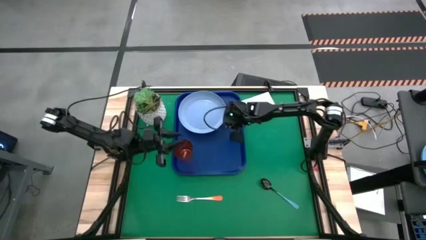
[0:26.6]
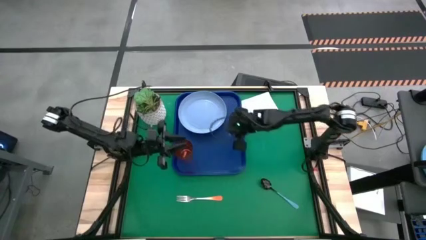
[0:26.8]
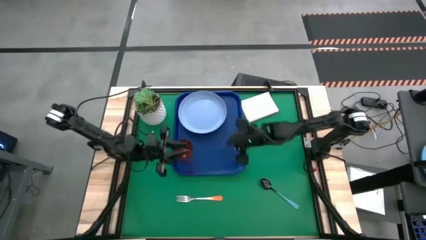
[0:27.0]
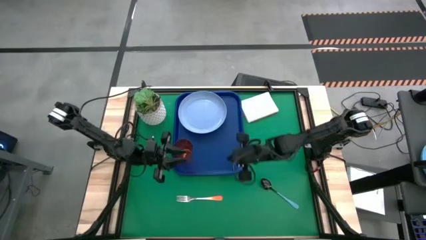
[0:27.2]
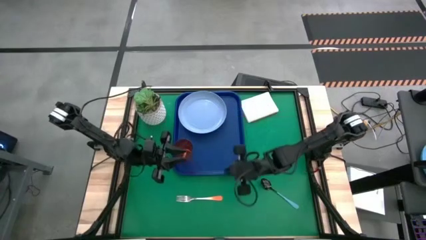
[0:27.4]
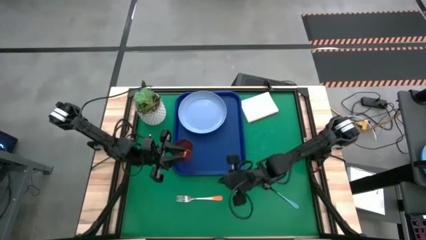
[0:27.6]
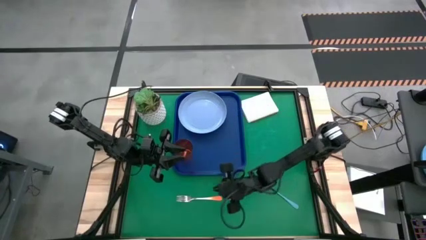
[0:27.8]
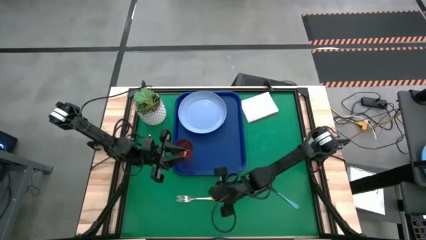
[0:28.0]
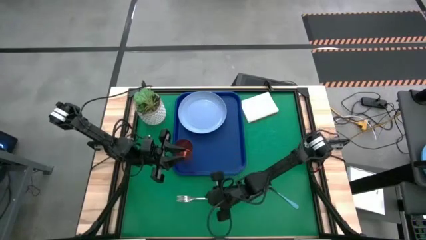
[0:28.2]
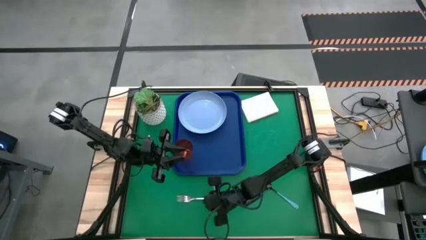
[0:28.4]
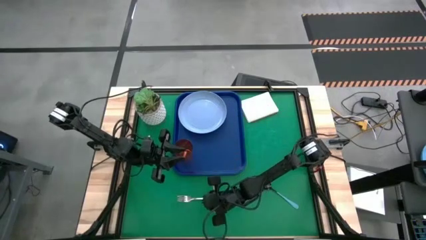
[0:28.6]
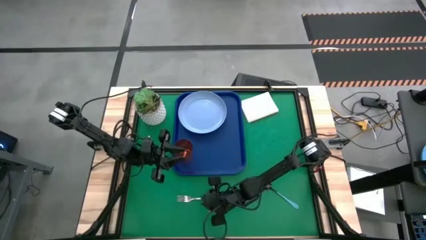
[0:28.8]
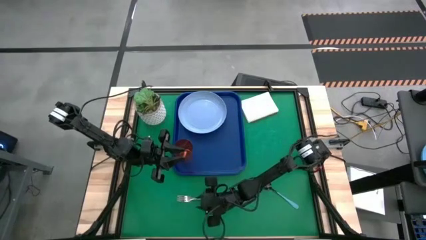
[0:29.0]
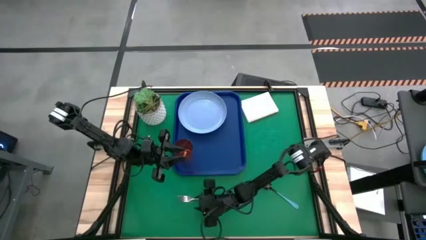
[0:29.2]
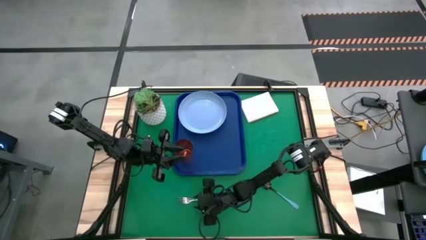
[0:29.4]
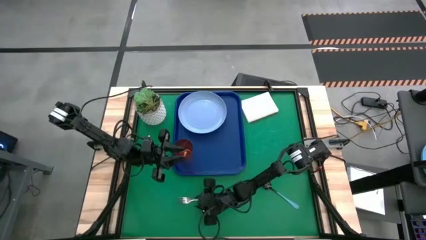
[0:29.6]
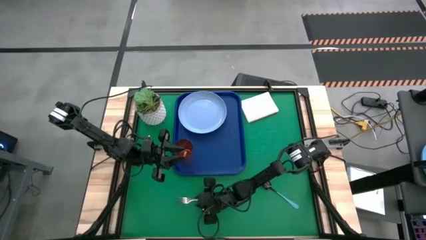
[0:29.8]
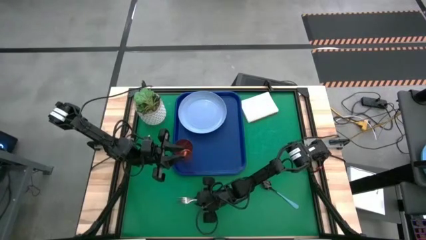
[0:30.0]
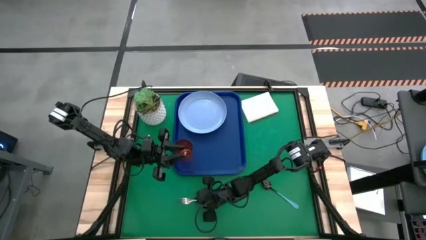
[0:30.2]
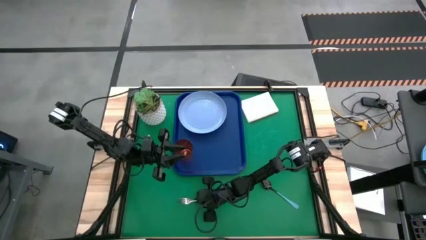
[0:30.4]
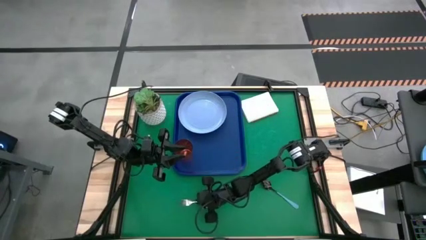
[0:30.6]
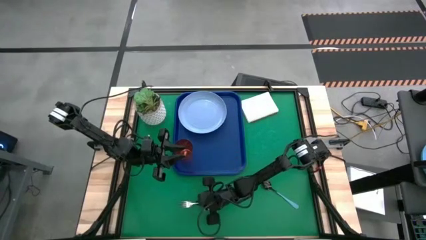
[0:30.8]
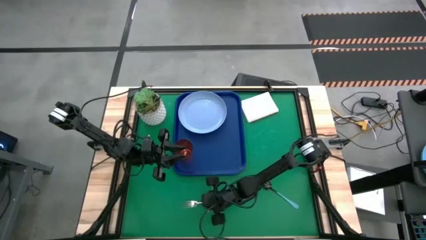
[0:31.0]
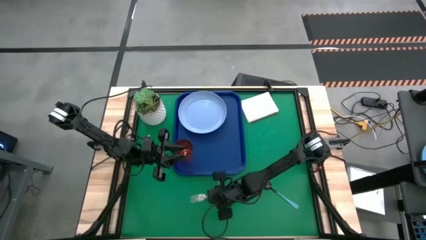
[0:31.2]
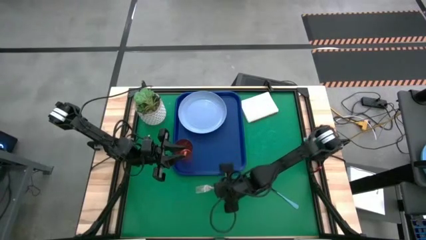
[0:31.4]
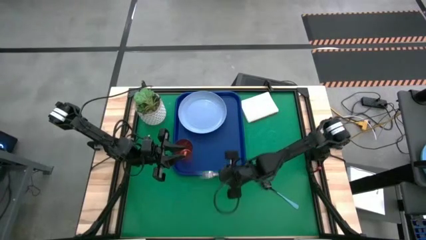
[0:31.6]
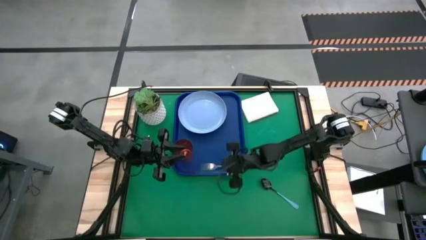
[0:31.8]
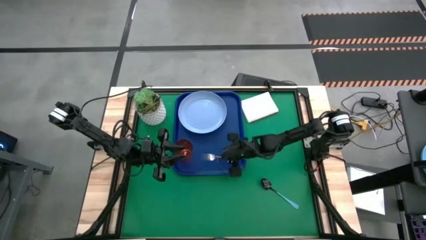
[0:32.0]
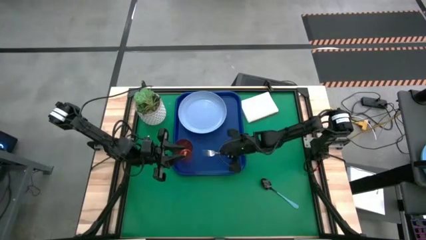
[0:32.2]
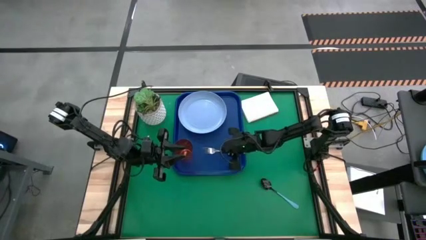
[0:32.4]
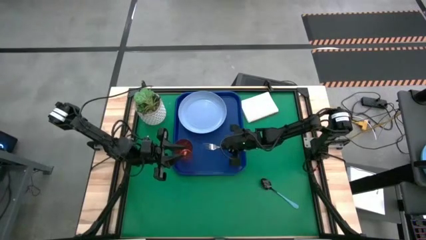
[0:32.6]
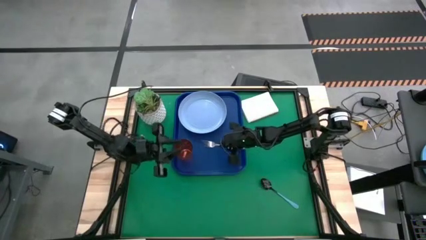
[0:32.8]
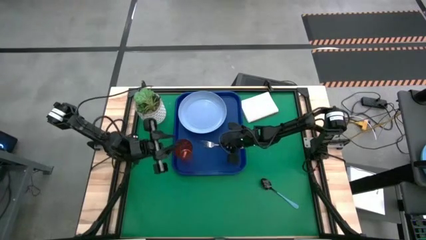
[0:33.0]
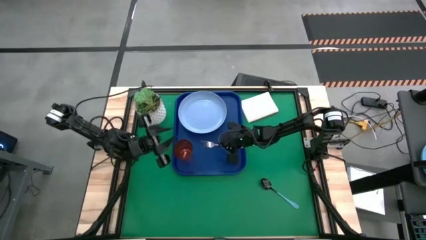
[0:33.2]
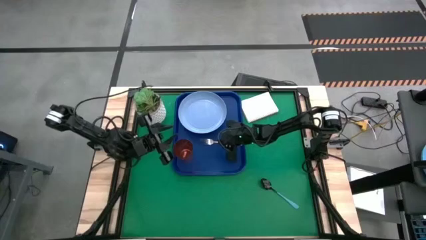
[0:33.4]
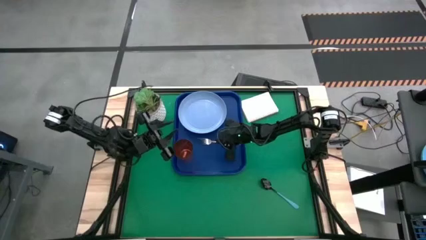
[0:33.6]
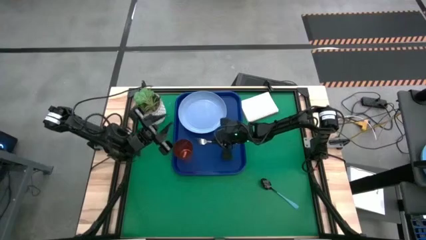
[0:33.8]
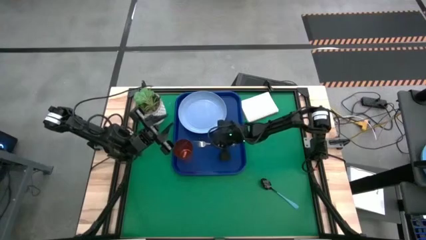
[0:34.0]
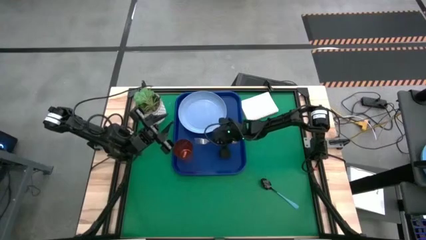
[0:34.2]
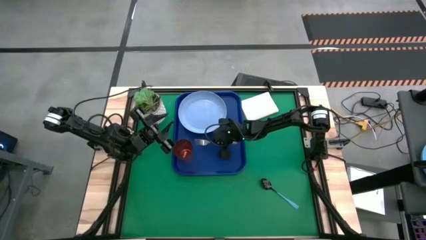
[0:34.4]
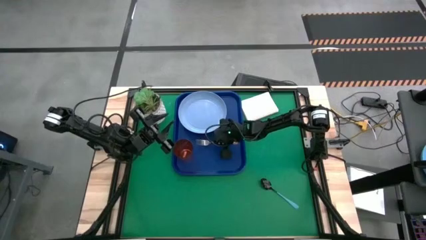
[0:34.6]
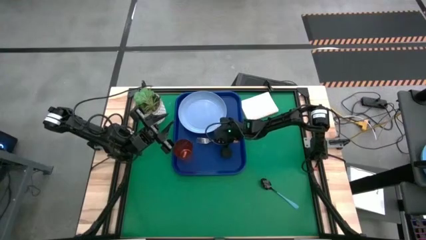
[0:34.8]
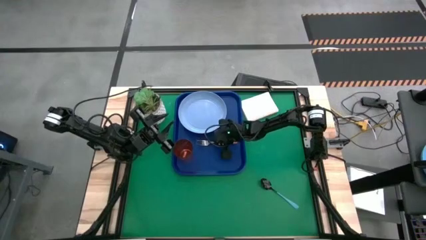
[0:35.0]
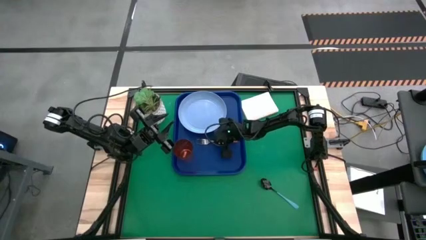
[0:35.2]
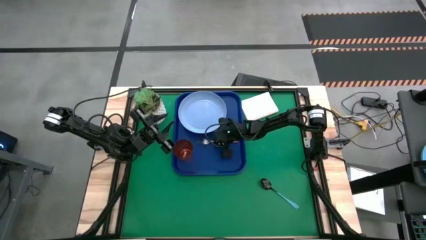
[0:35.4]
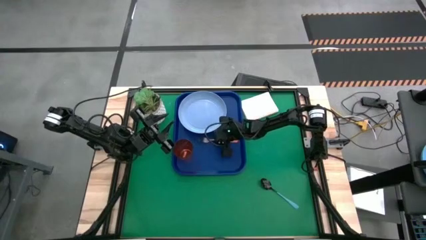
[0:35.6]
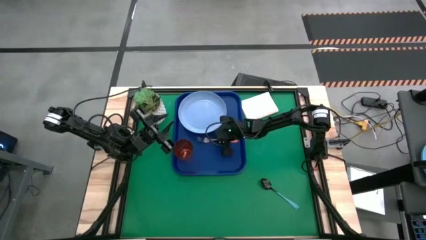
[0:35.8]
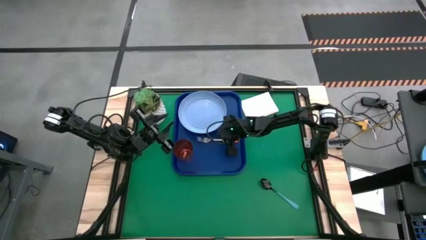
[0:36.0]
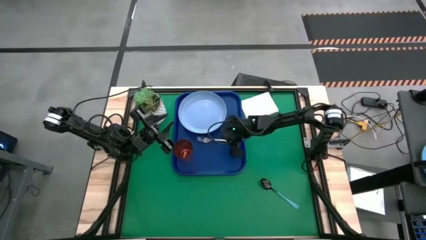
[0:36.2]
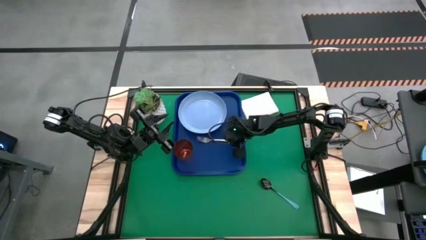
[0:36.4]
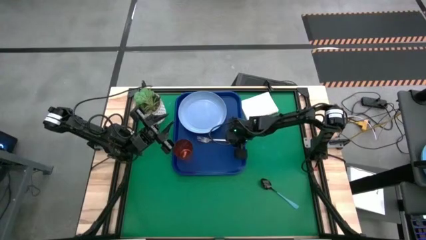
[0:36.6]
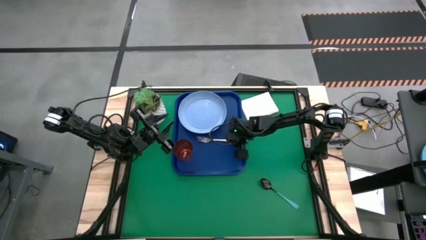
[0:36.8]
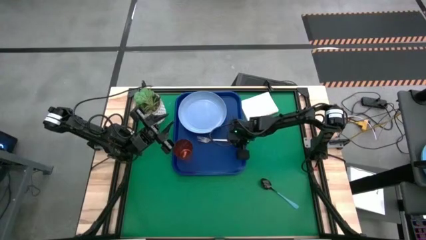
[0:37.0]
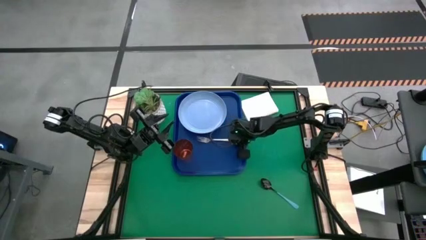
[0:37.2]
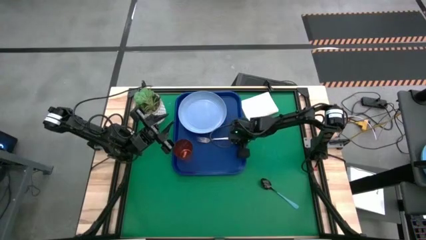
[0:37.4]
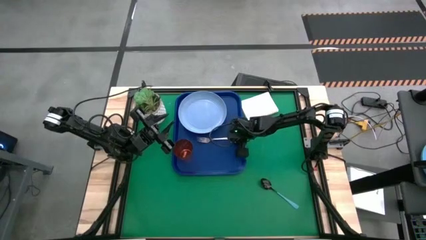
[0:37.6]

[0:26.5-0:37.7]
Task: Pick and place plate/cup/fork/spoon on tray
Put the orange fork on the blue tray to the left of the light blue plate

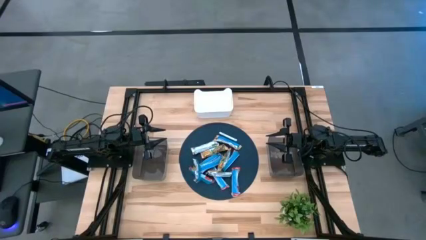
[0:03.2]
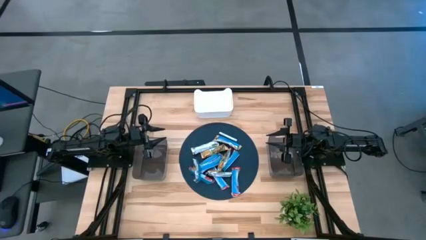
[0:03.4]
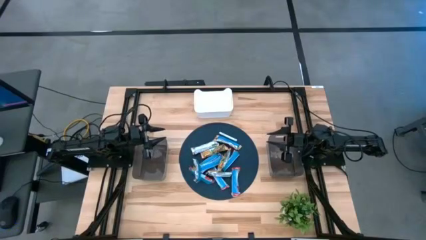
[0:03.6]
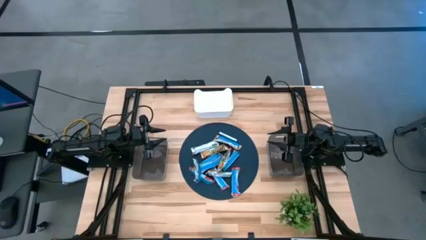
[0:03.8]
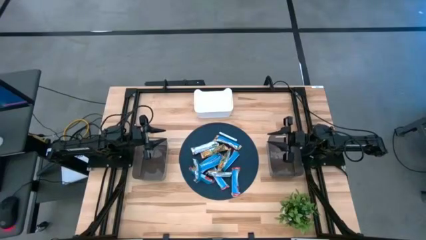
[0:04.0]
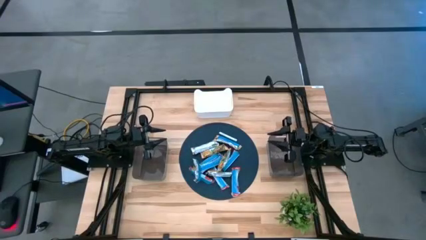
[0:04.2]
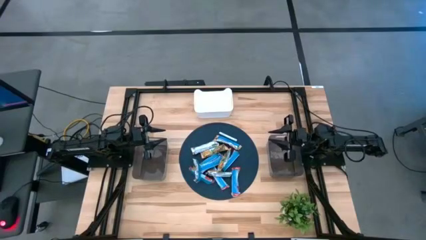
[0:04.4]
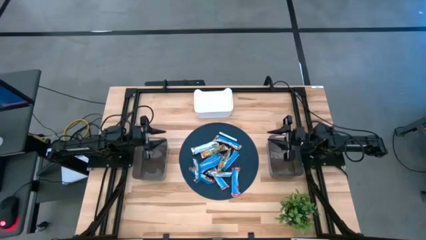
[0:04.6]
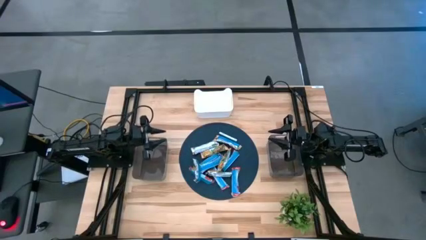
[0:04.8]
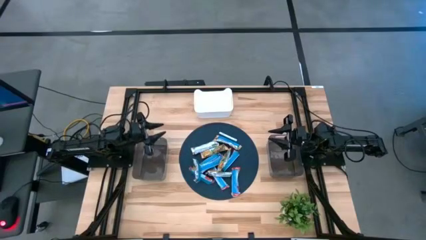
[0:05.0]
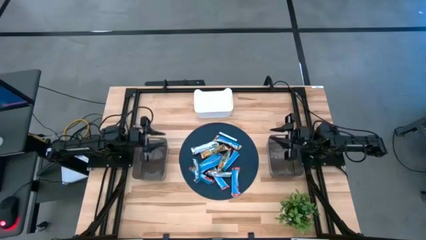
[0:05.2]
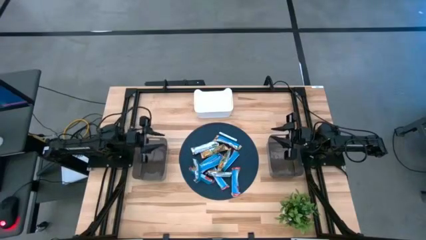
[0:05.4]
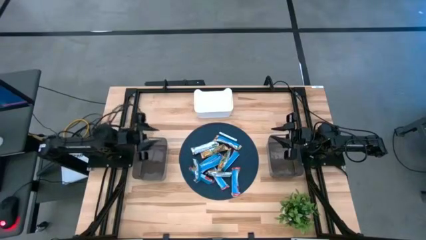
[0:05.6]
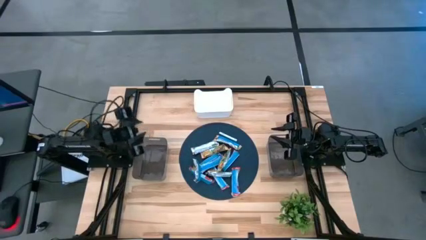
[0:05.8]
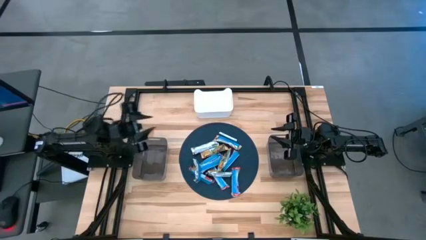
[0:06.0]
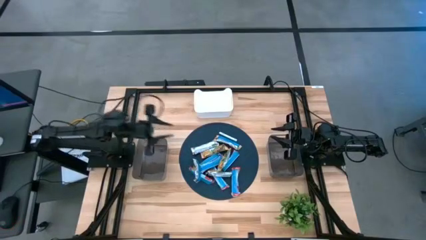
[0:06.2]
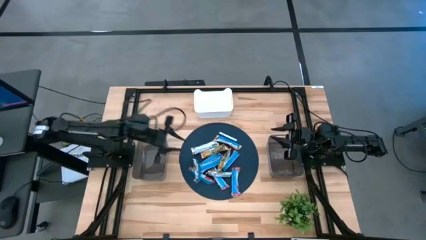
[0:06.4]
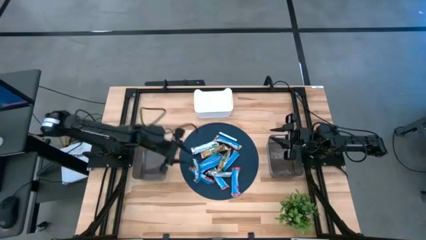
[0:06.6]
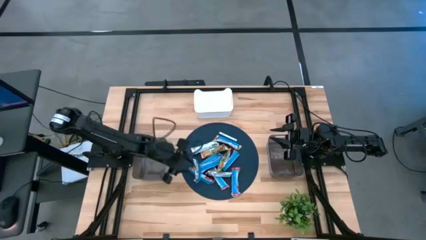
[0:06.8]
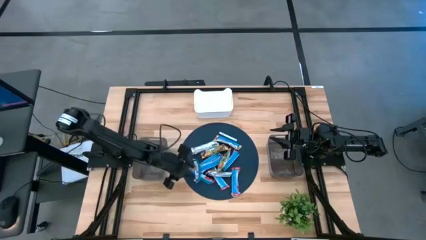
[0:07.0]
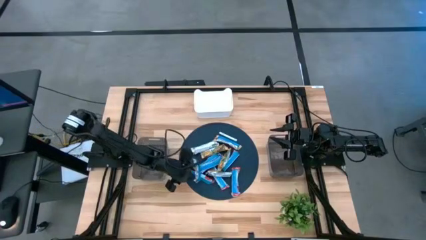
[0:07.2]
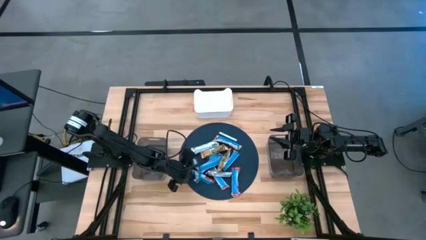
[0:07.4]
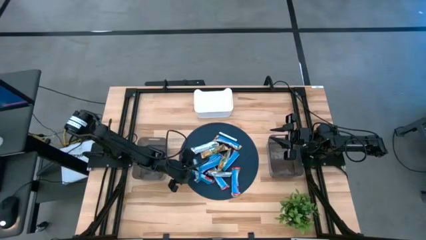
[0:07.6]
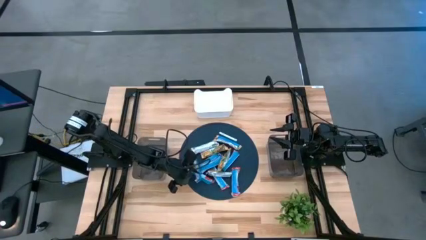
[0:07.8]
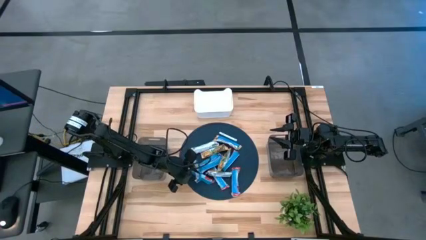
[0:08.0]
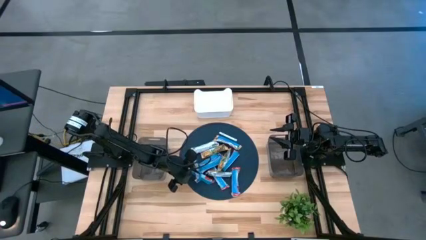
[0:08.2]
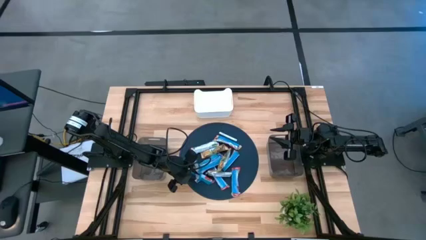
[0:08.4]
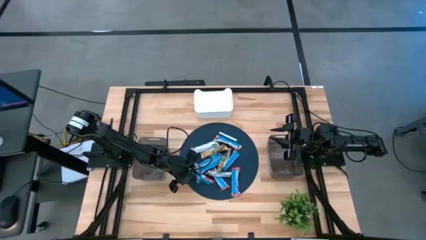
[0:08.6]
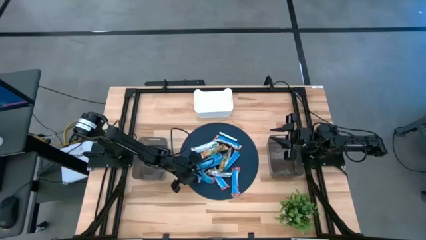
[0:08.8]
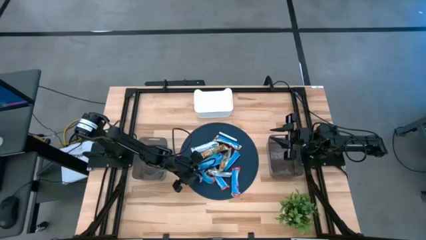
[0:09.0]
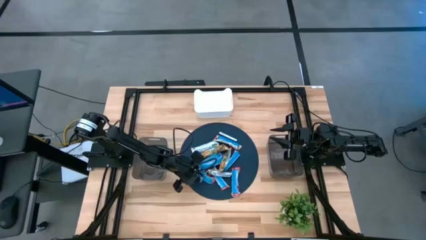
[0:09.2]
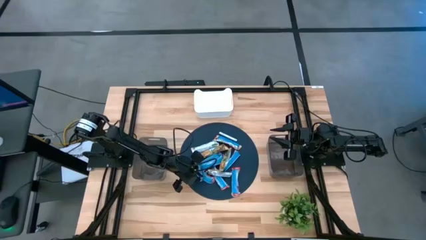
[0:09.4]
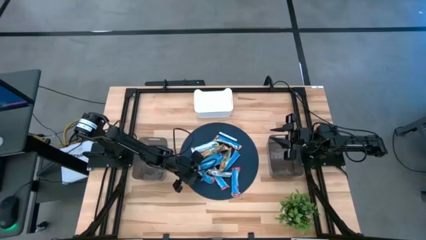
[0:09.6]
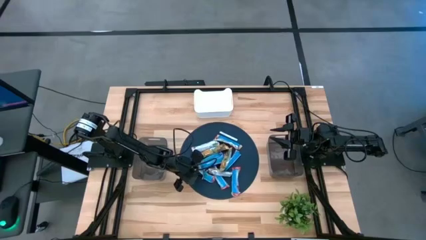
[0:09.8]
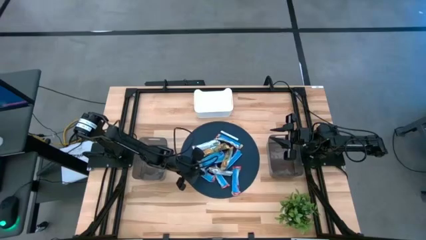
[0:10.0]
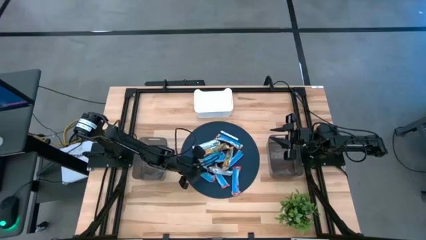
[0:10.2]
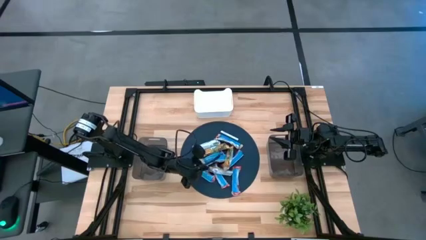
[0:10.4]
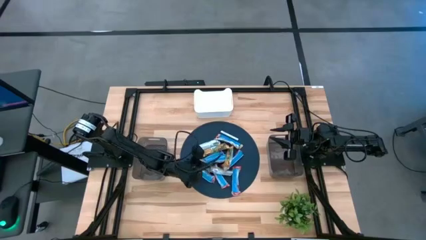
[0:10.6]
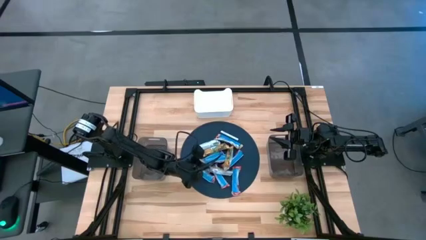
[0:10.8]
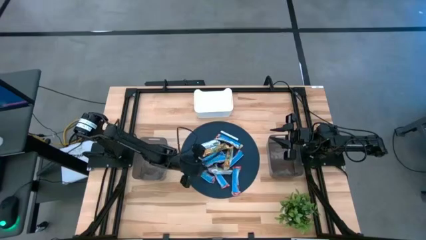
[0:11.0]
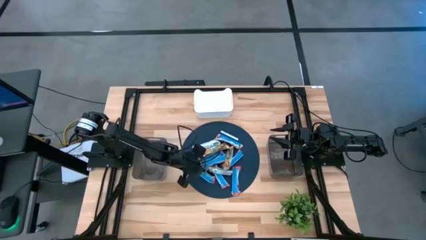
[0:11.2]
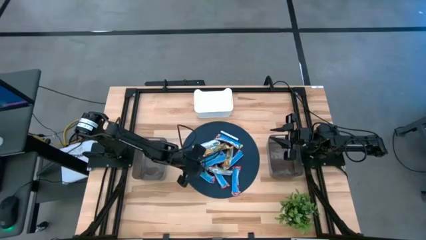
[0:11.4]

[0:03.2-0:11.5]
Task: Pick and place Granola Bars by type
Put the blue granola bar into the left black bin
